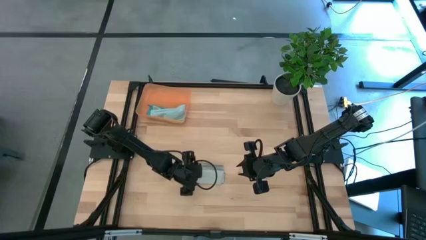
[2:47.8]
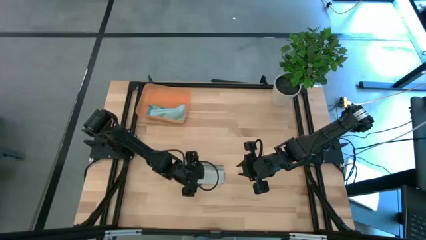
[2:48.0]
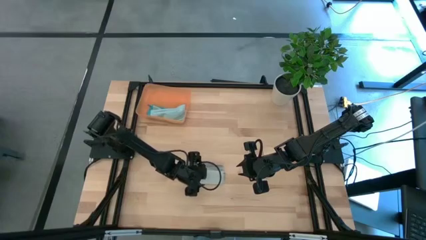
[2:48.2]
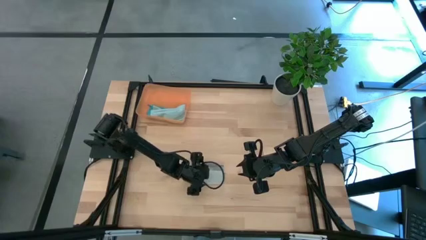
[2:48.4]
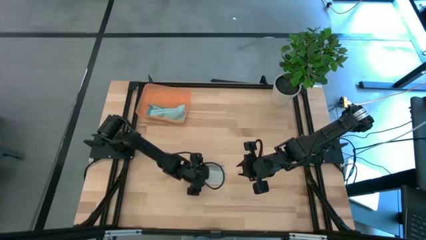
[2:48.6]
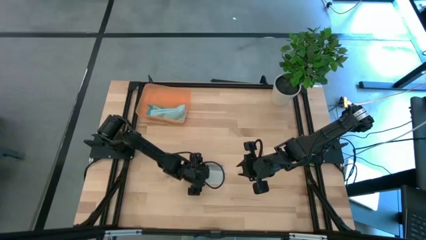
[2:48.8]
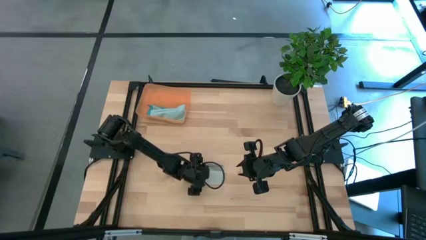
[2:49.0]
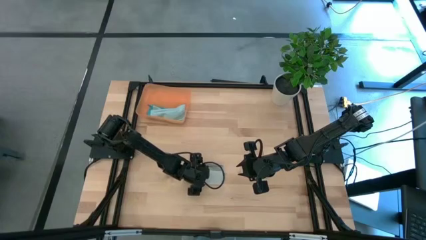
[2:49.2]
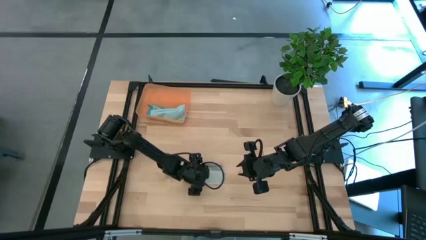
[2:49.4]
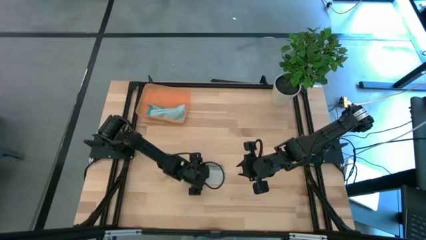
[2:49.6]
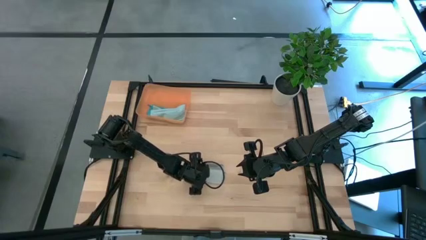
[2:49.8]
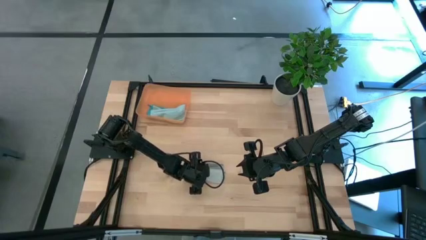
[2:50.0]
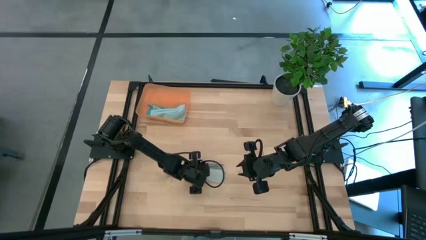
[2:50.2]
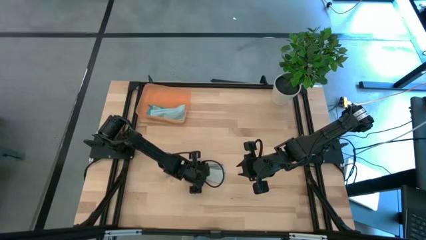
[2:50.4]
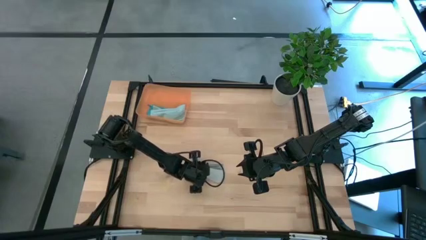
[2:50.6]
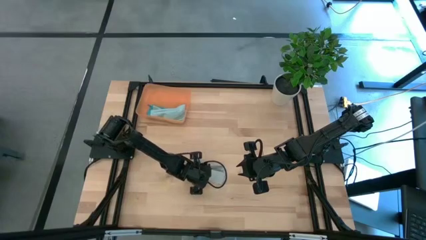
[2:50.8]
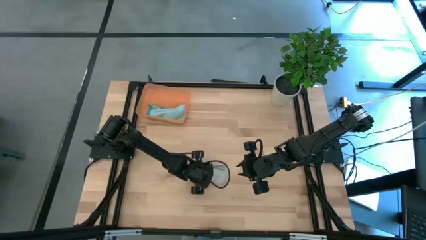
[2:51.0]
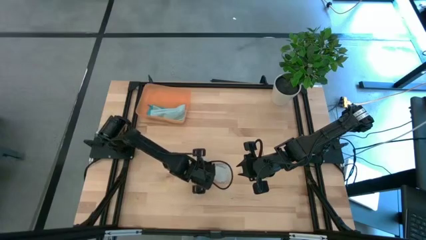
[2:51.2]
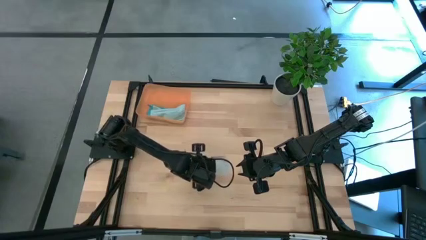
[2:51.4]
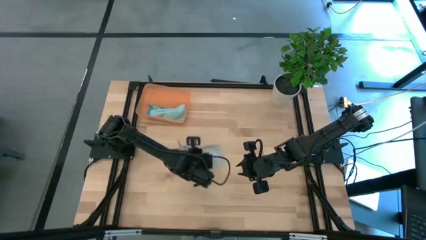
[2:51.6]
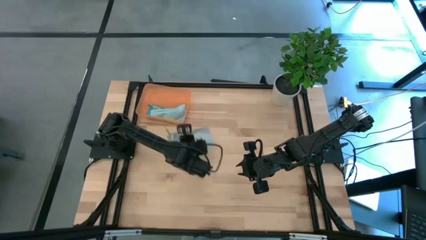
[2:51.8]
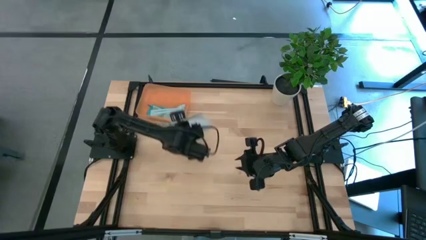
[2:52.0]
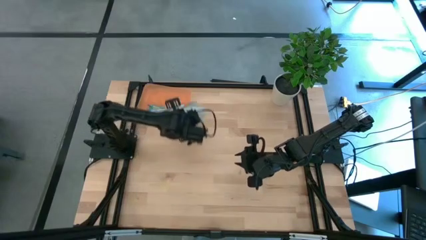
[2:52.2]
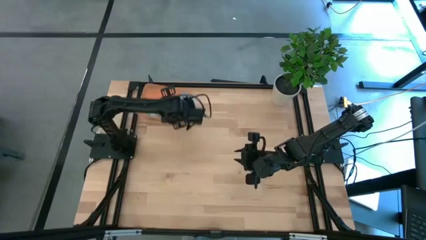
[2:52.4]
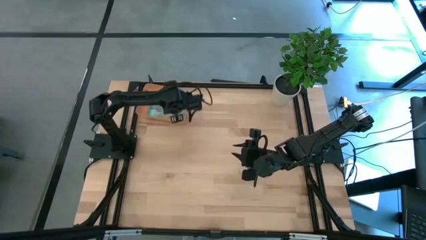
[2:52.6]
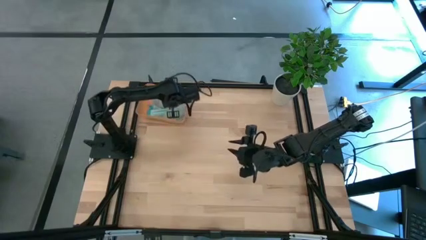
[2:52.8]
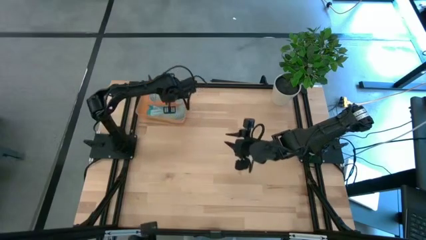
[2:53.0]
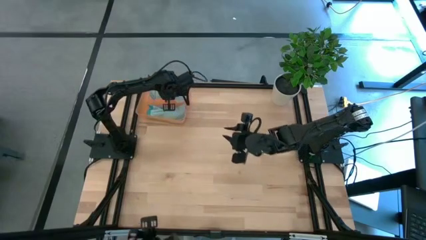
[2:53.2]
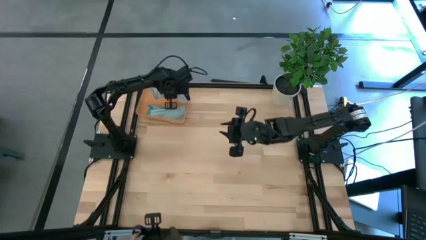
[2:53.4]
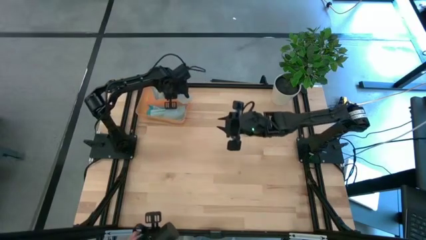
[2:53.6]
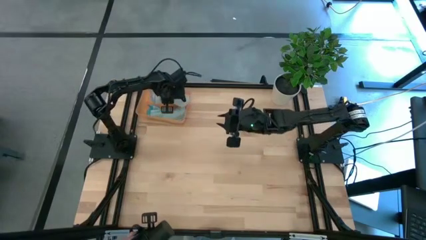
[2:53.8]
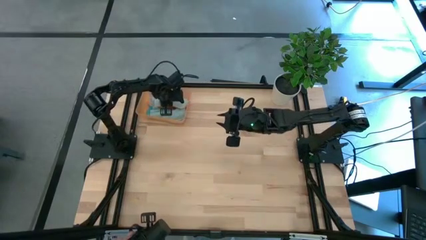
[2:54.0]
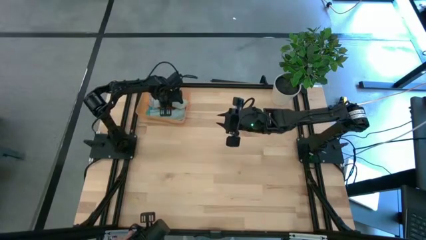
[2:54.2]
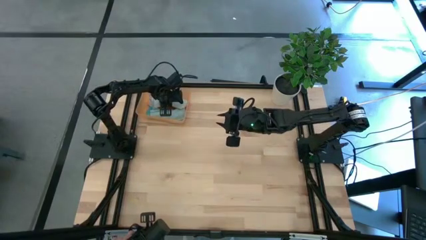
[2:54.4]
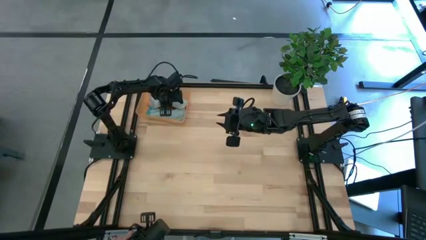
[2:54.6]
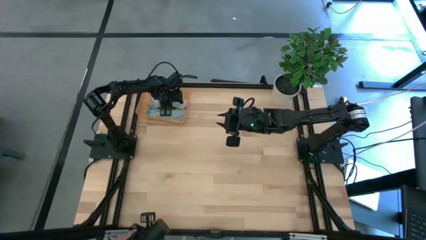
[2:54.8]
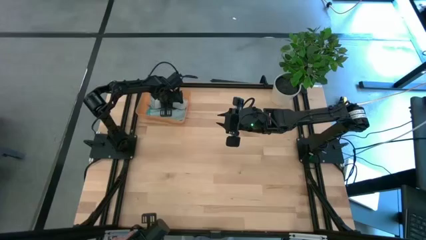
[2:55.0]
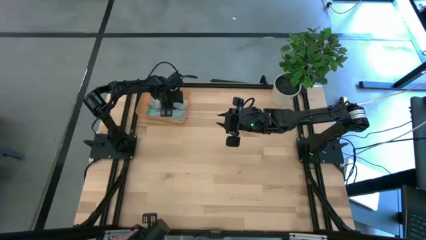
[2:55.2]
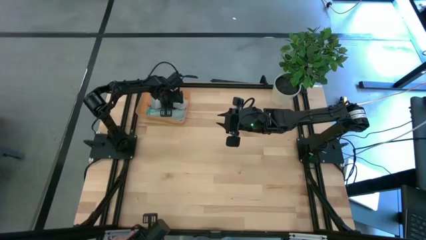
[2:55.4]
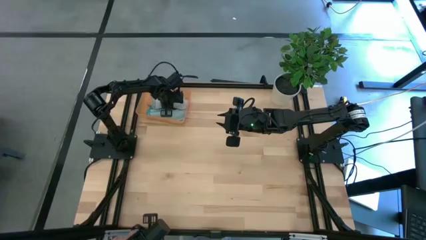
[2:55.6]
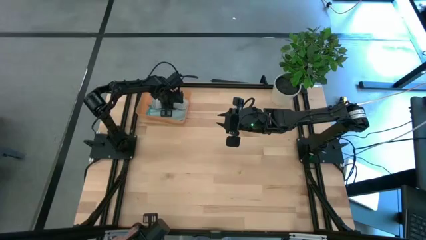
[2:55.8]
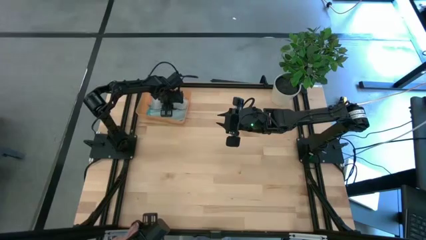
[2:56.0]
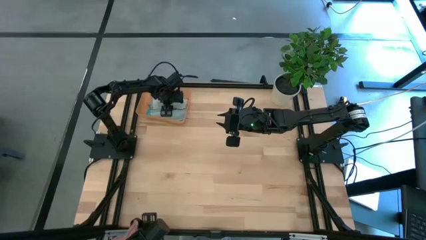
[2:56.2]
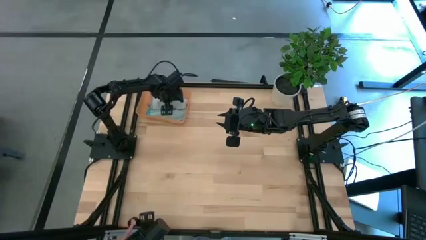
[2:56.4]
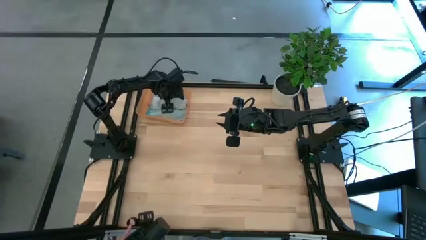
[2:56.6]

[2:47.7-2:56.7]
Task: Roll microfiber towels into tight, uniform cylinder then place into a basket
Put the gray microfiber cloth into the bin

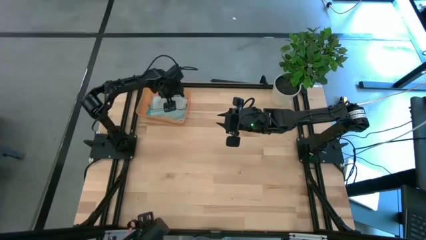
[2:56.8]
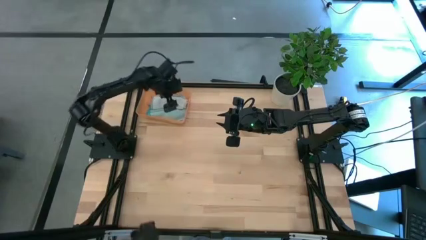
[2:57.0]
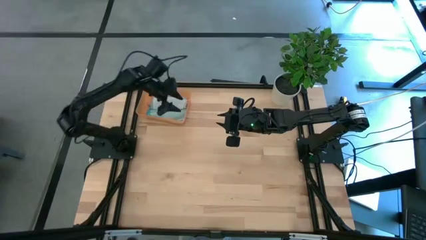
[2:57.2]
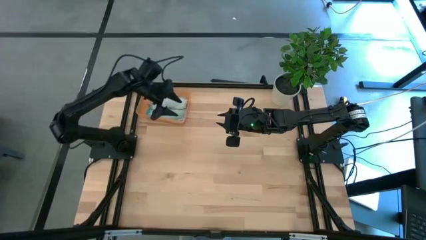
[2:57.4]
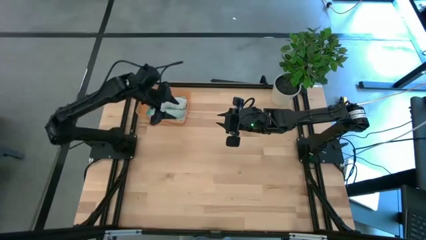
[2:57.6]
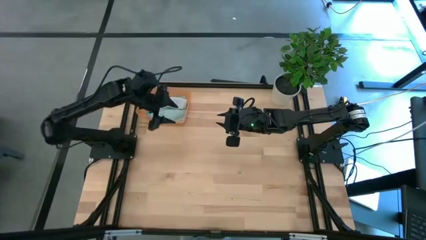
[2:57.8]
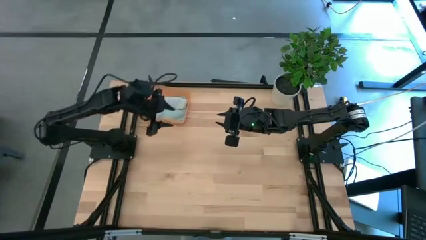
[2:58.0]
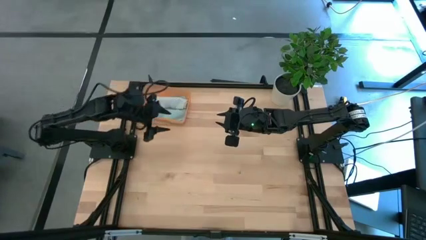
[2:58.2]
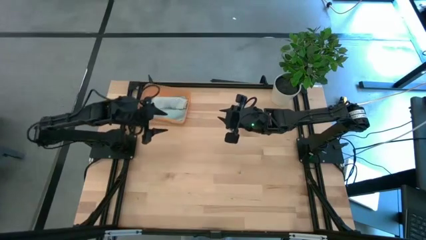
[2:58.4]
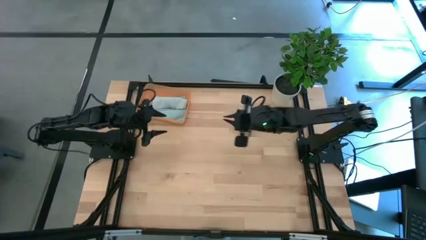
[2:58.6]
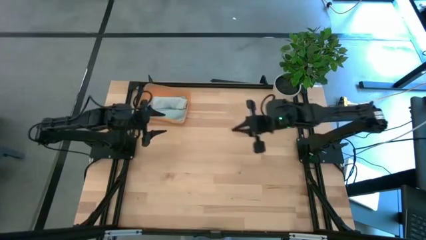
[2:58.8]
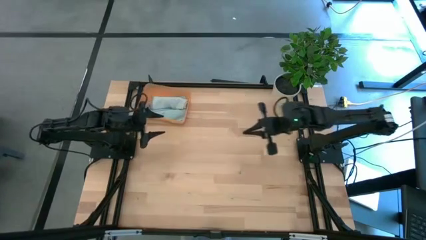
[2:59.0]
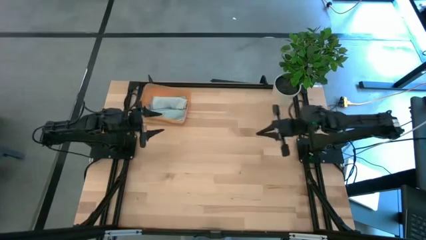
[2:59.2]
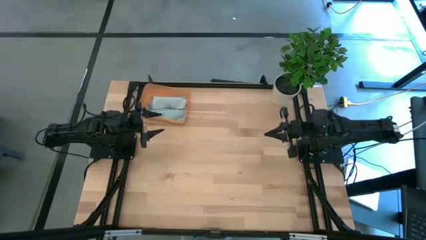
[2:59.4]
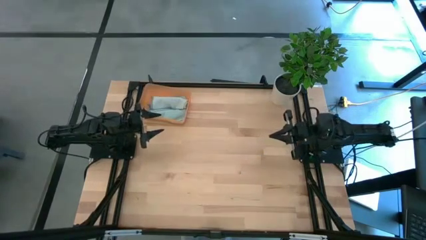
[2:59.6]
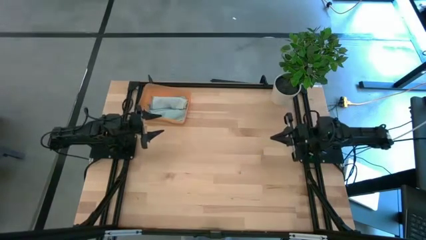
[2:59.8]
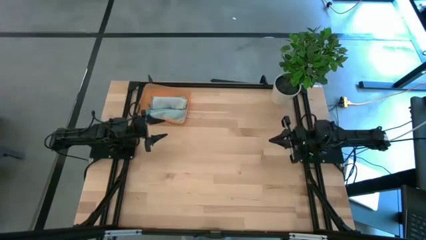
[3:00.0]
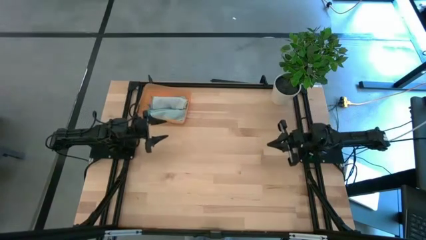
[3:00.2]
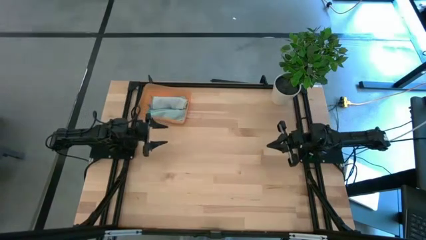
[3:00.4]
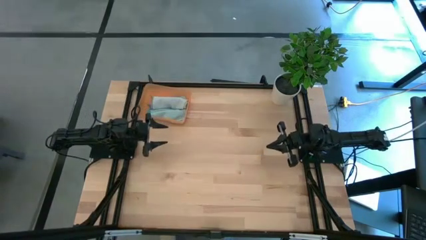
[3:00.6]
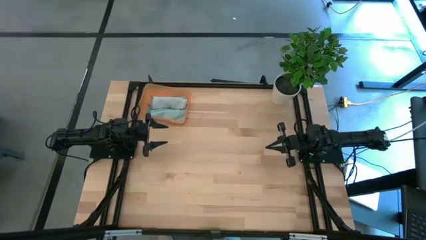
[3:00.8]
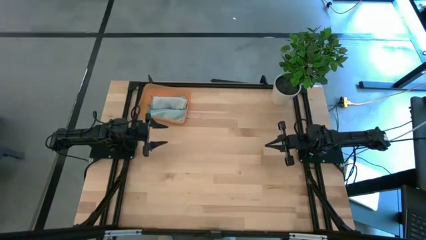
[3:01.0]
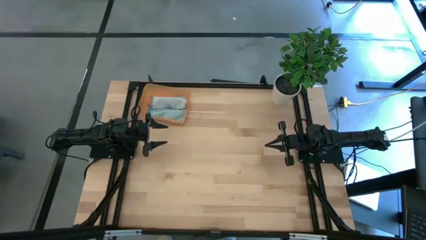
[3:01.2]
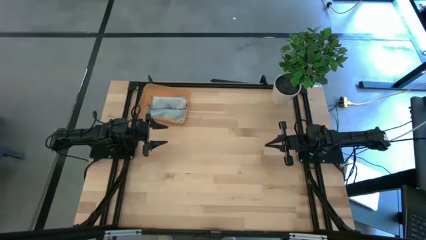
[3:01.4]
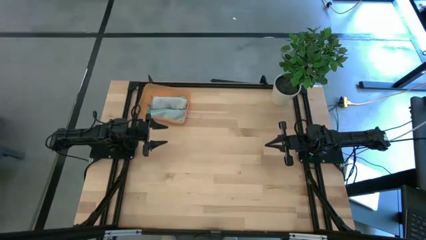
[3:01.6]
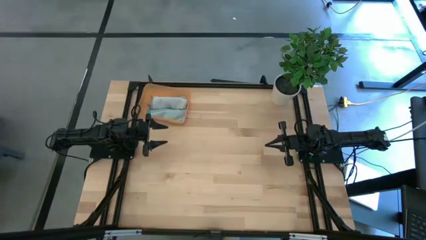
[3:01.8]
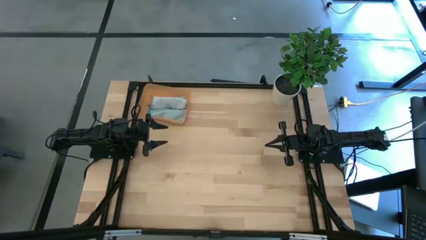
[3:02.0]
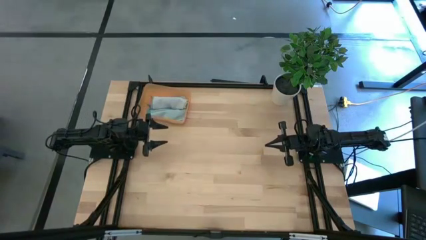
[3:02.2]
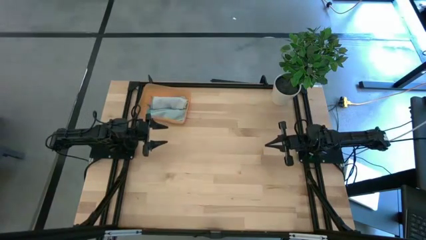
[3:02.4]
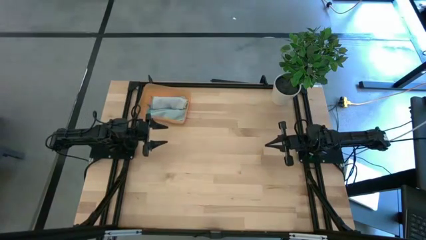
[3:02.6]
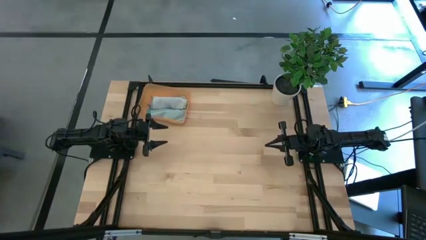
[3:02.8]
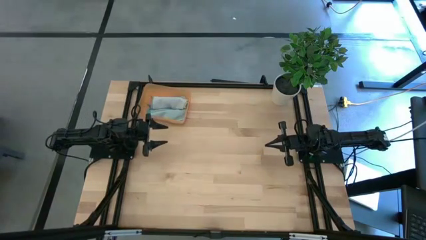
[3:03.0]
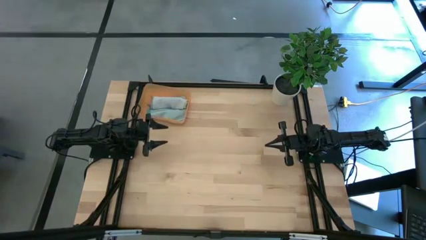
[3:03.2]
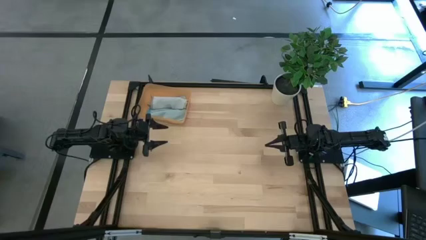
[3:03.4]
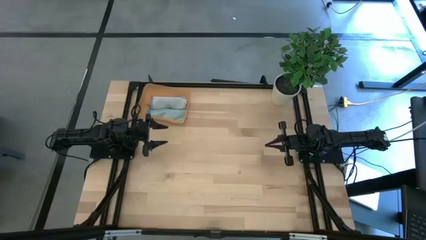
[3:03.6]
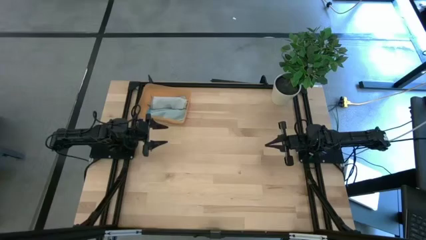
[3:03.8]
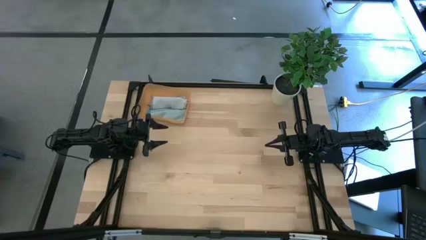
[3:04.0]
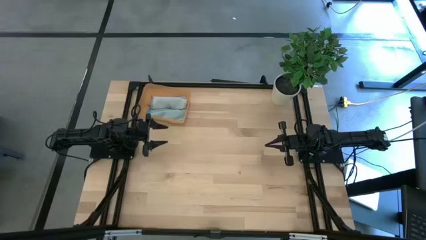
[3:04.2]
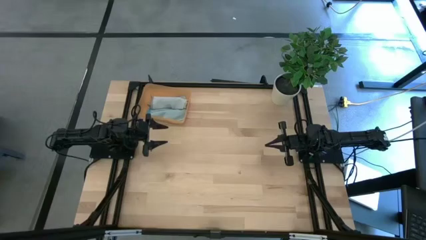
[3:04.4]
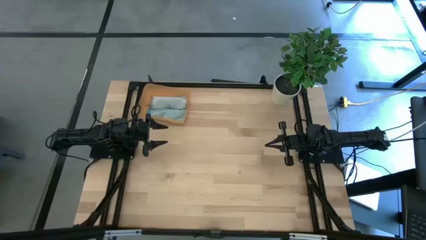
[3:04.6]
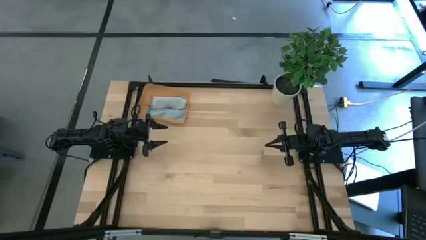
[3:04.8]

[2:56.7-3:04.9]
Return to Home Position
